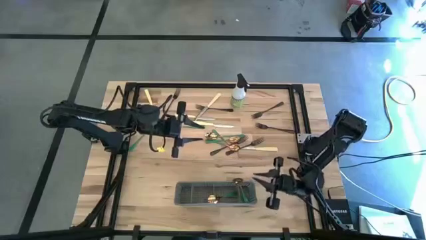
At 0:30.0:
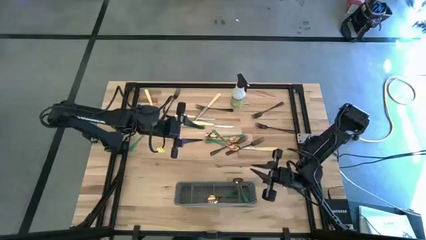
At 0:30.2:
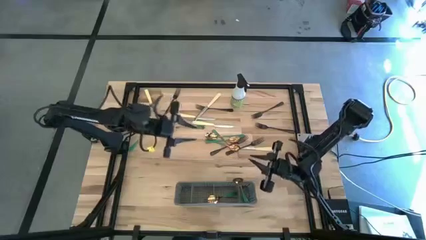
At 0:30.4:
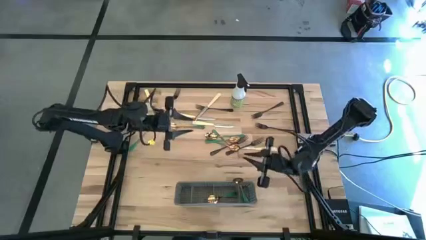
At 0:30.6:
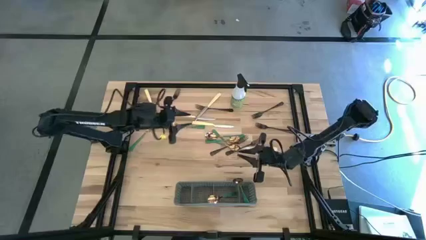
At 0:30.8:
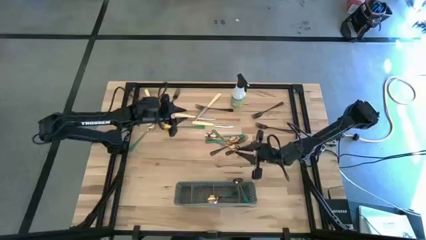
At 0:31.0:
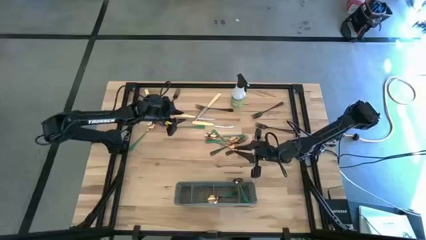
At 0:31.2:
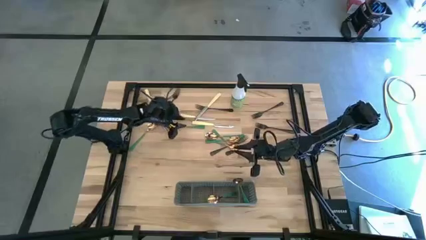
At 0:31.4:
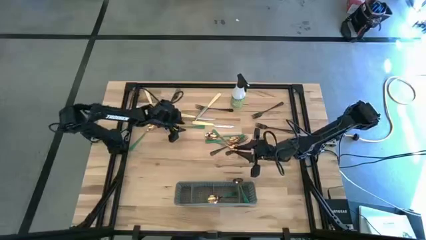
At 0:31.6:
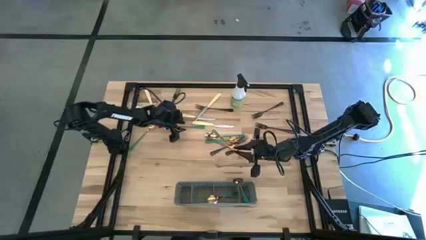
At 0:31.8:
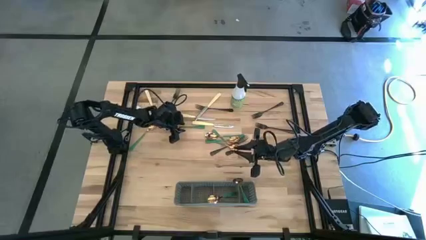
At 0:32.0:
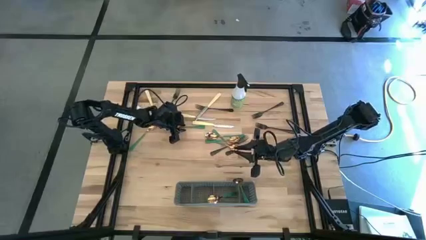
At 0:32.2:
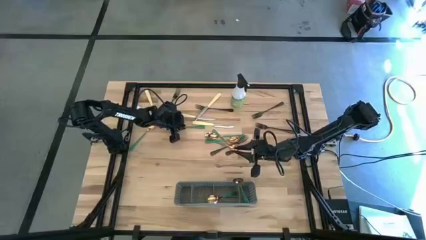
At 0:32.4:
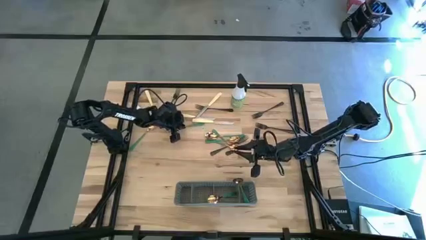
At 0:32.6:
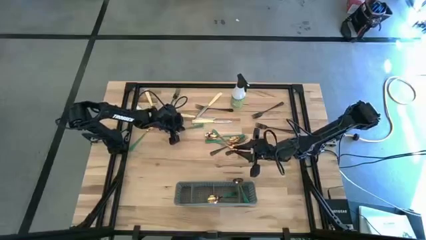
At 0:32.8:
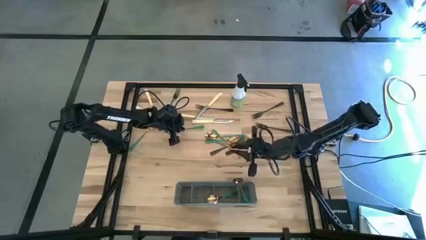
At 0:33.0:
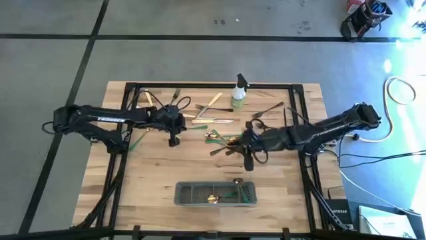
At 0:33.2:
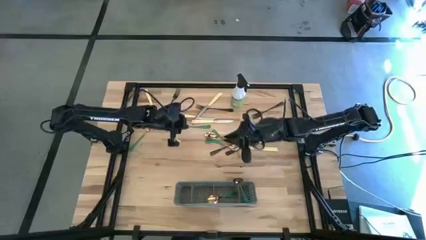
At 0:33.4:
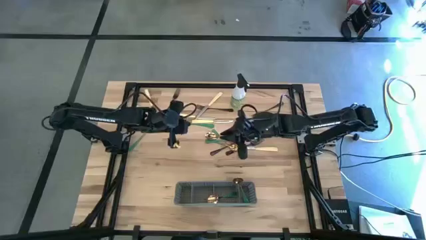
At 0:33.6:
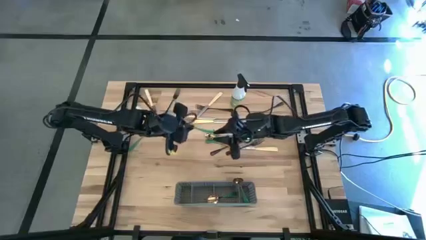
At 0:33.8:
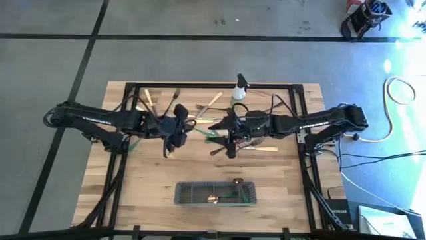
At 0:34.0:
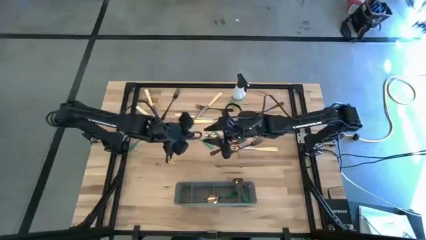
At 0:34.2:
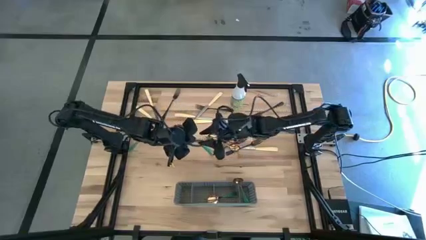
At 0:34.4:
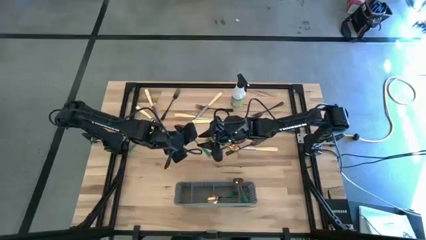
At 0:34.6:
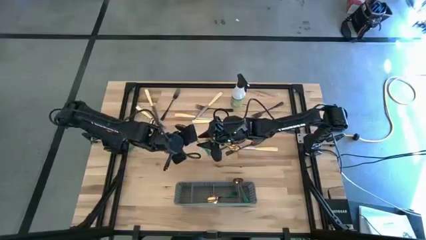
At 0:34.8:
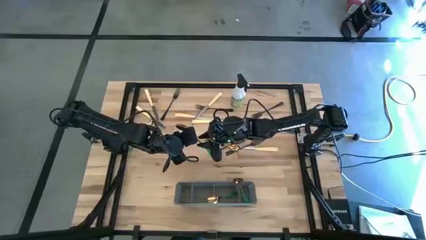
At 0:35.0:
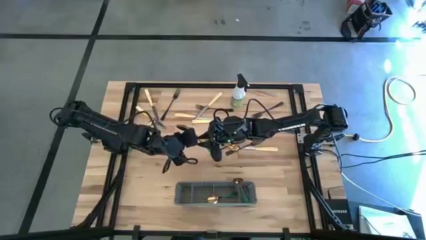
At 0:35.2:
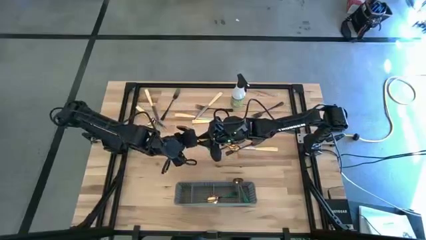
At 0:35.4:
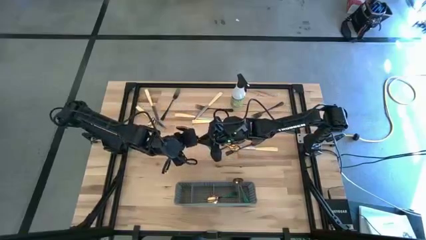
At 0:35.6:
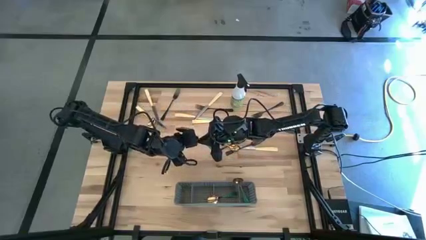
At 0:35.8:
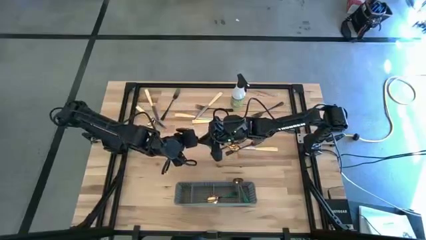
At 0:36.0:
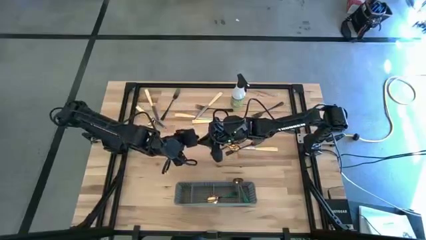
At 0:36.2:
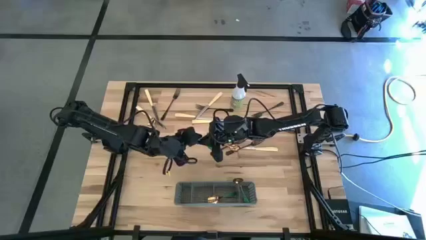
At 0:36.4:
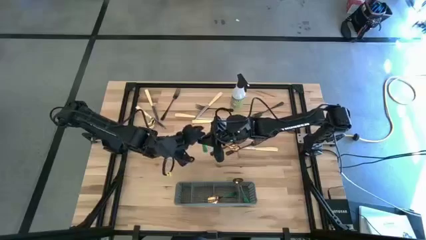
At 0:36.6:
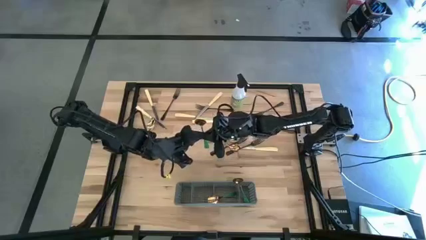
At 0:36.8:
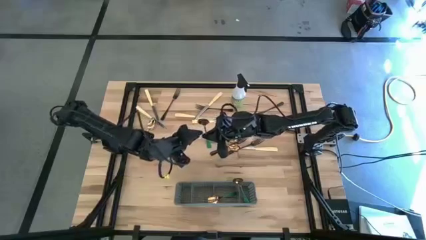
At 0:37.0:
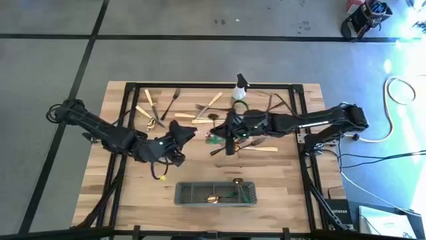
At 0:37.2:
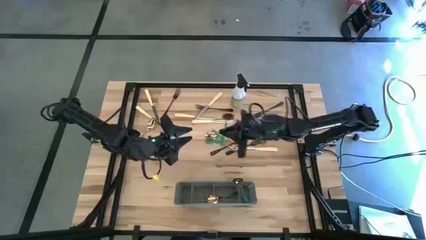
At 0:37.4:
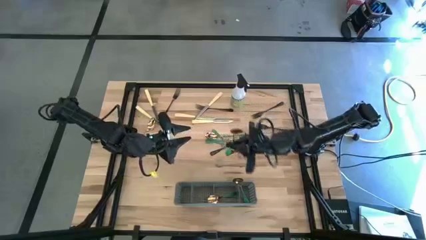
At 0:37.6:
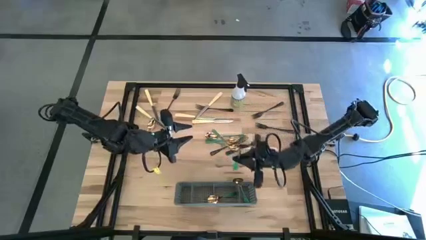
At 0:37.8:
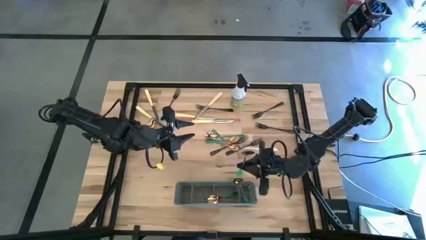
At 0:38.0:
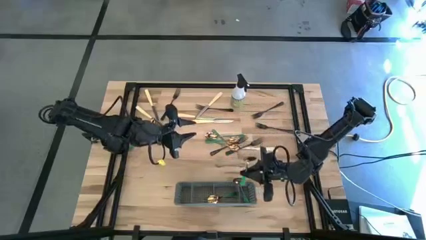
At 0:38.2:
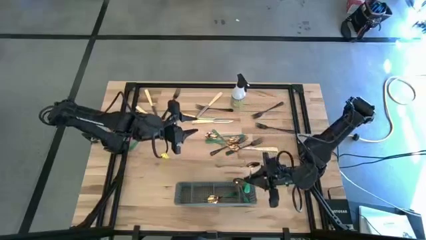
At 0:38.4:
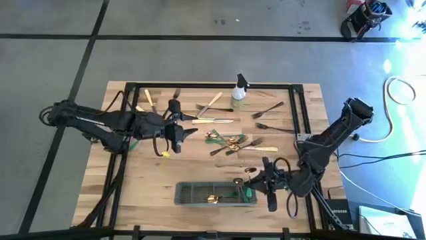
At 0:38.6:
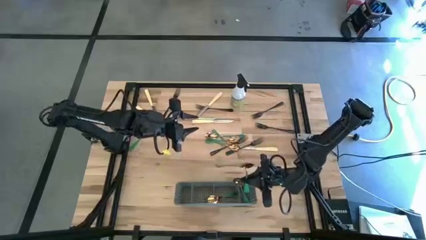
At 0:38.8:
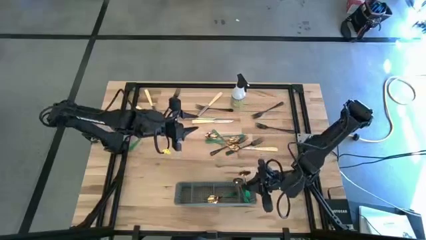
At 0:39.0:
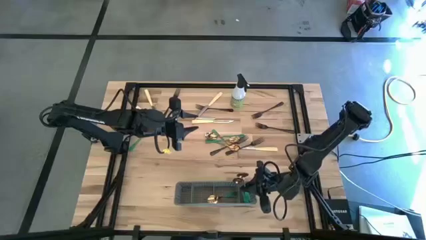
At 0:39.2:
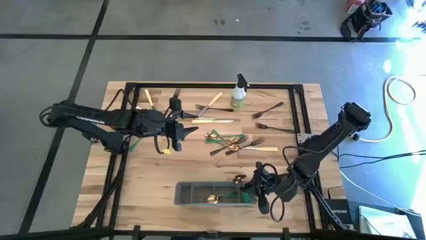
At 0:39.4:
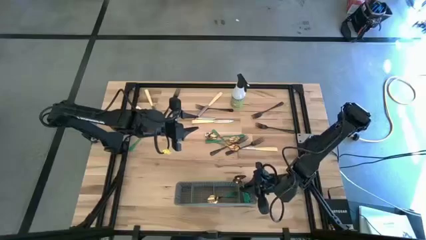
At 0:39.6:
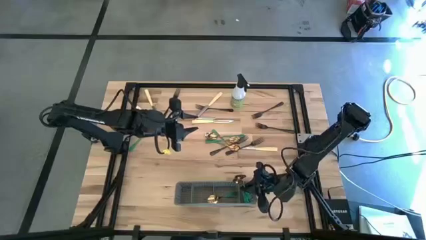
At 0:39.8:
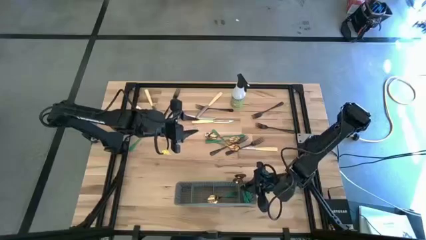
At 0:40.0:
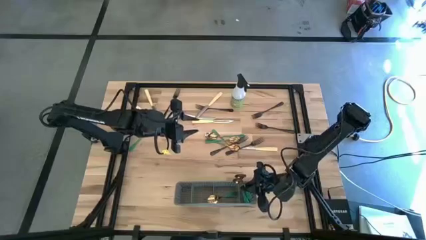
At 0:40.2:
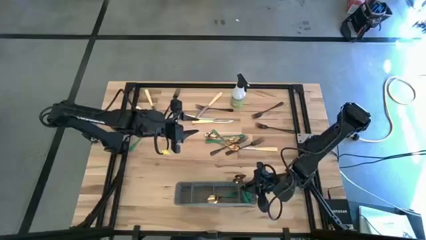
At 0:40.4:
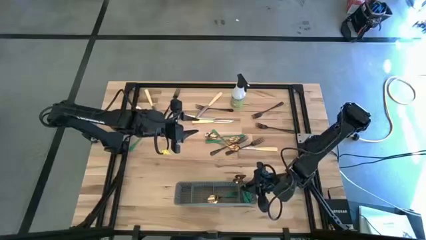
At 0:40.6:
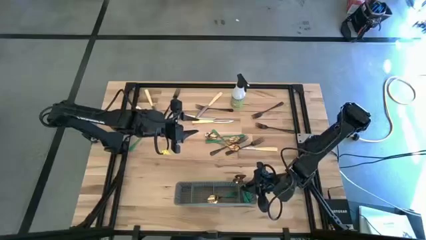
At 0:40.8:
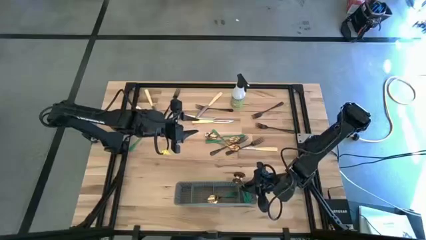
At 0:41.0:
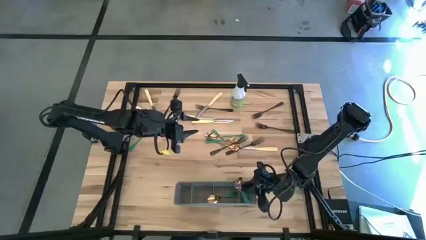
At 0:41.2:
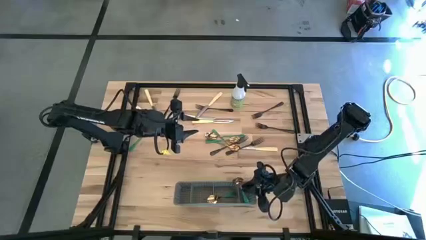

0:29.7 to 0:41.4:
Task: Sort silverware
Put the middle green spoon into the gray cutlery rack
